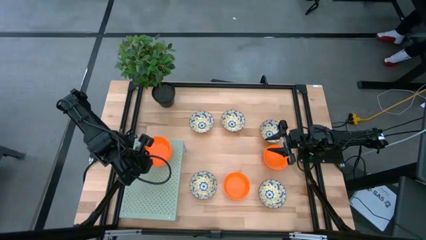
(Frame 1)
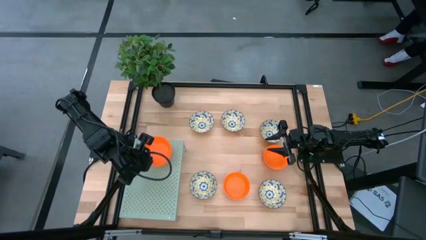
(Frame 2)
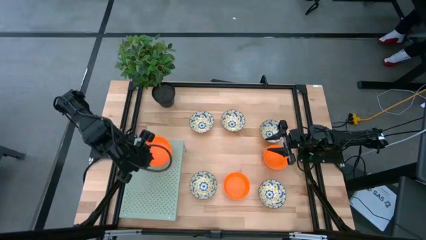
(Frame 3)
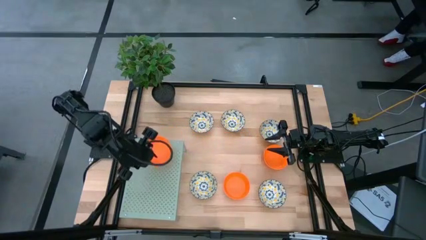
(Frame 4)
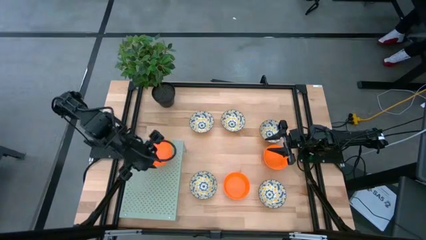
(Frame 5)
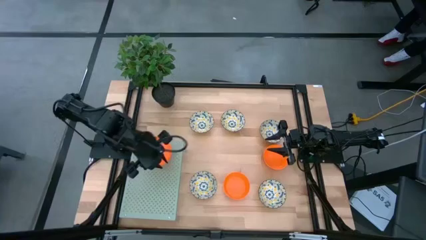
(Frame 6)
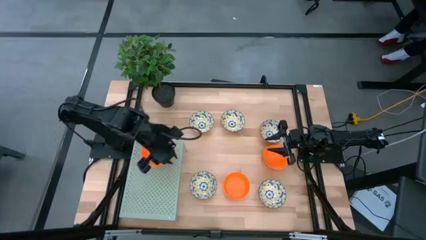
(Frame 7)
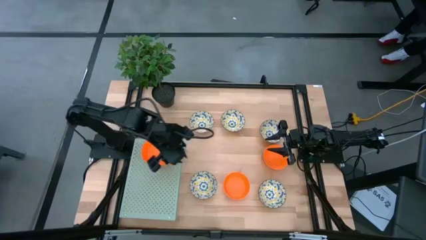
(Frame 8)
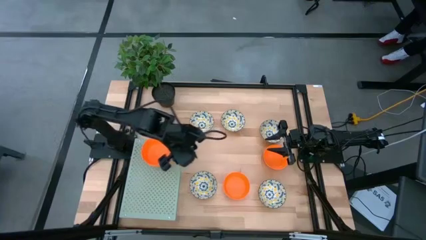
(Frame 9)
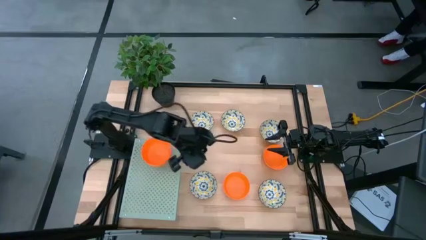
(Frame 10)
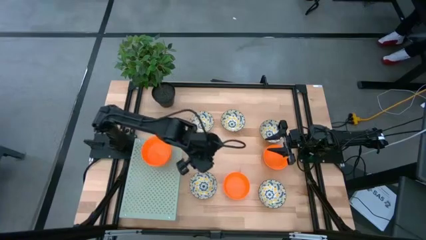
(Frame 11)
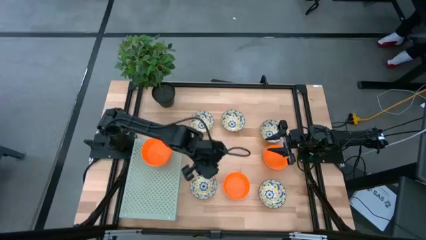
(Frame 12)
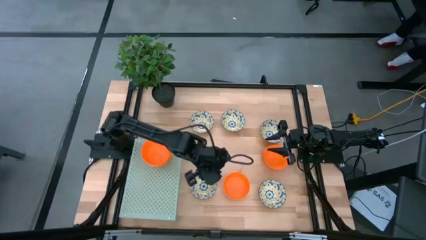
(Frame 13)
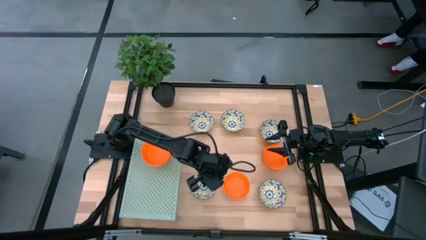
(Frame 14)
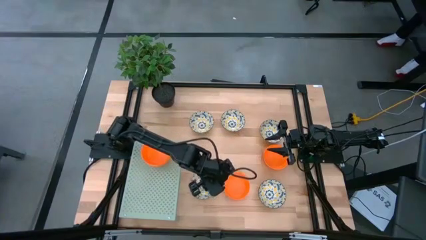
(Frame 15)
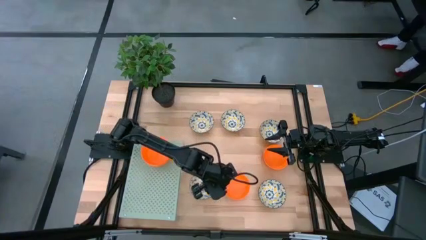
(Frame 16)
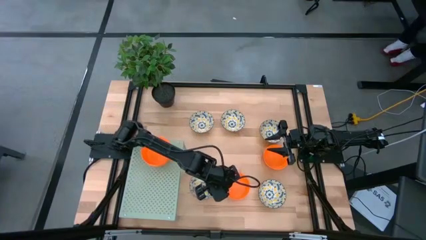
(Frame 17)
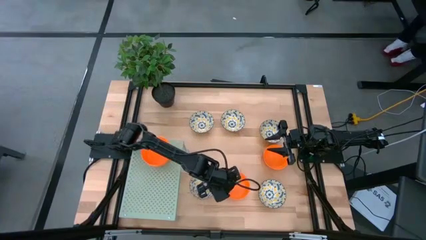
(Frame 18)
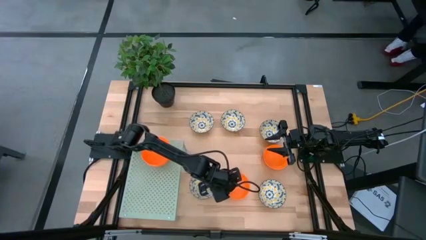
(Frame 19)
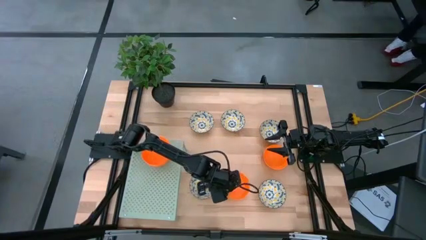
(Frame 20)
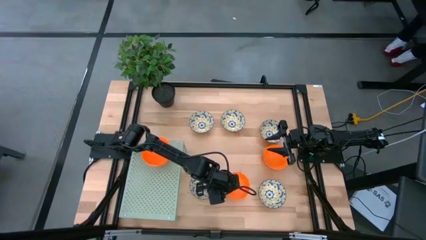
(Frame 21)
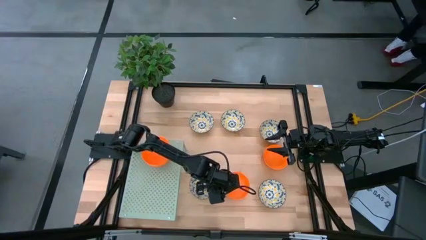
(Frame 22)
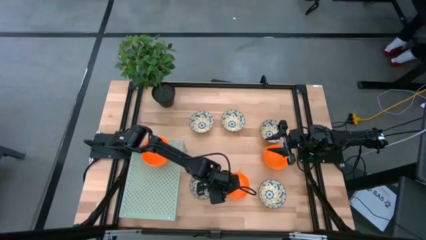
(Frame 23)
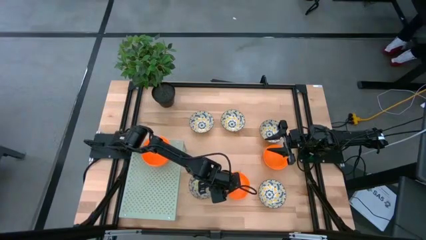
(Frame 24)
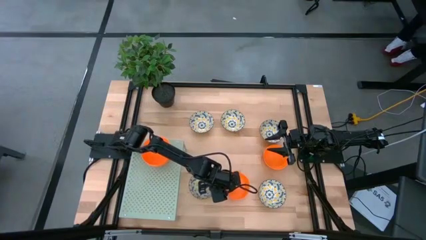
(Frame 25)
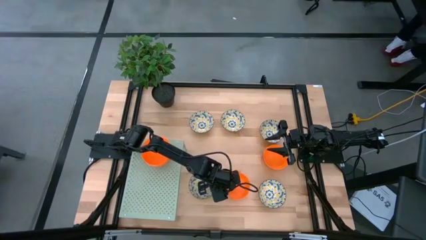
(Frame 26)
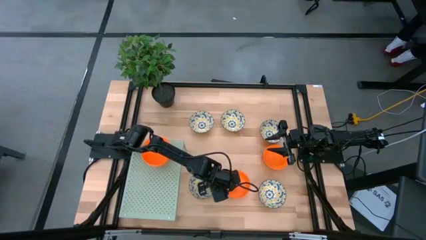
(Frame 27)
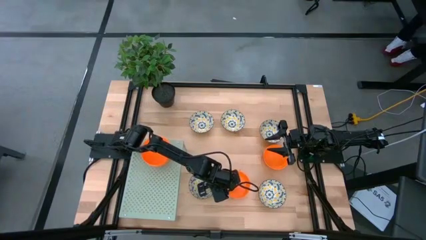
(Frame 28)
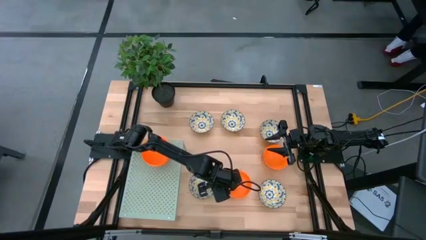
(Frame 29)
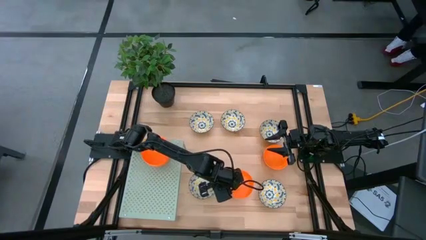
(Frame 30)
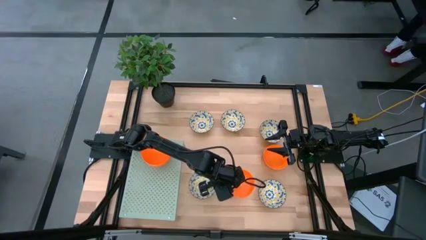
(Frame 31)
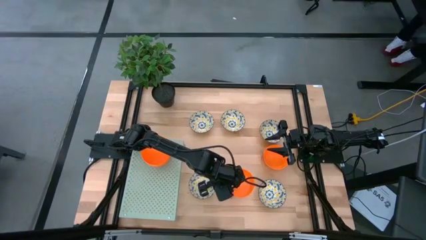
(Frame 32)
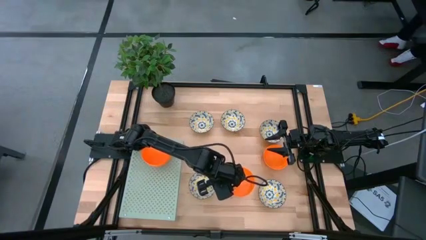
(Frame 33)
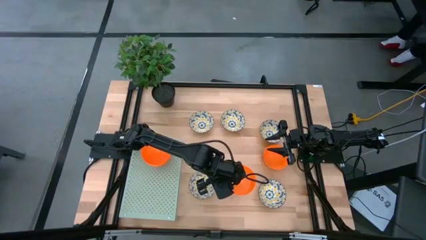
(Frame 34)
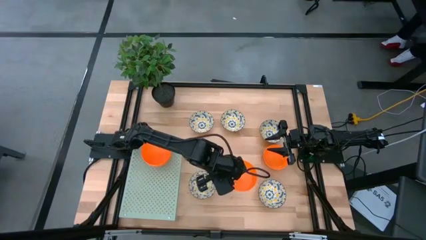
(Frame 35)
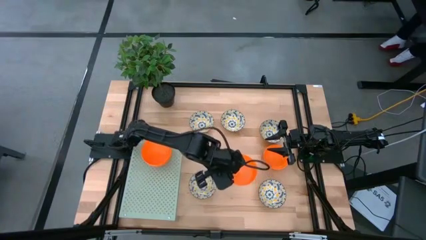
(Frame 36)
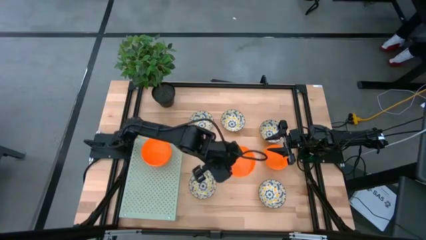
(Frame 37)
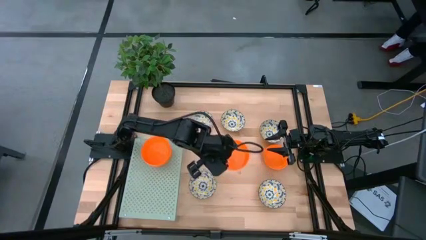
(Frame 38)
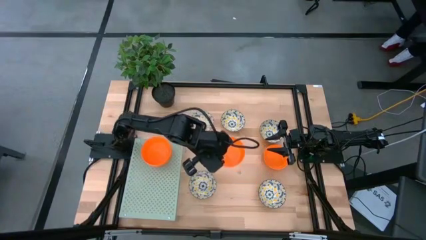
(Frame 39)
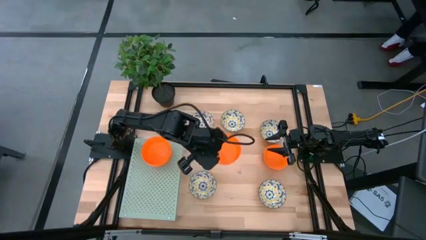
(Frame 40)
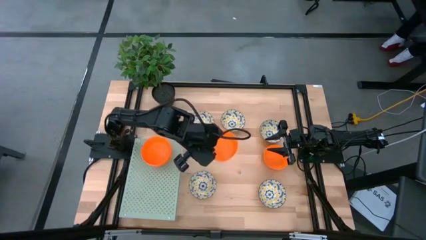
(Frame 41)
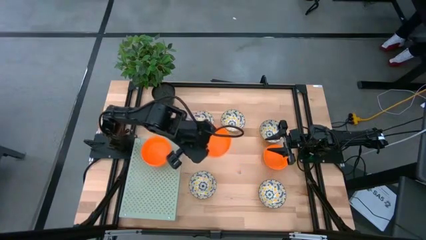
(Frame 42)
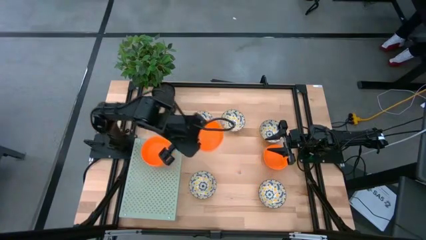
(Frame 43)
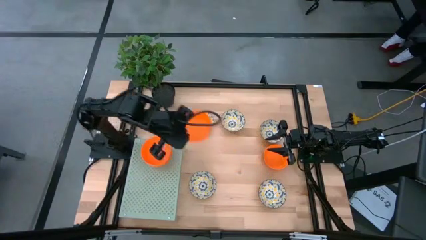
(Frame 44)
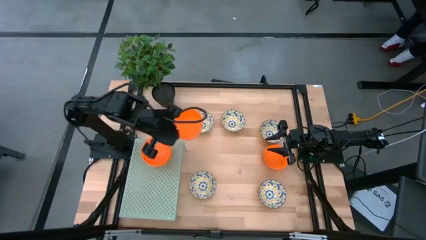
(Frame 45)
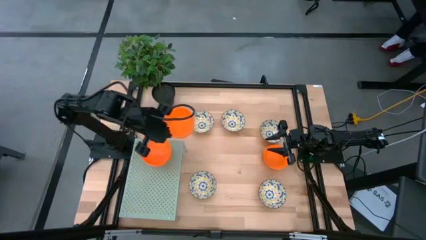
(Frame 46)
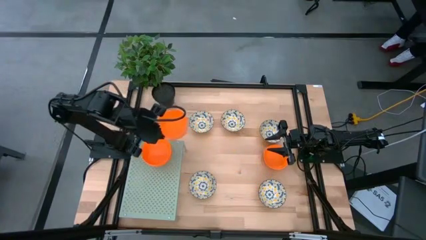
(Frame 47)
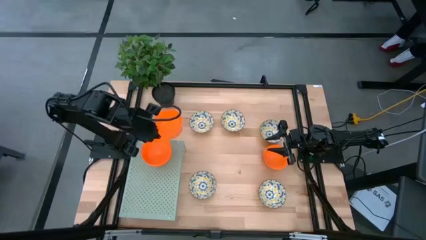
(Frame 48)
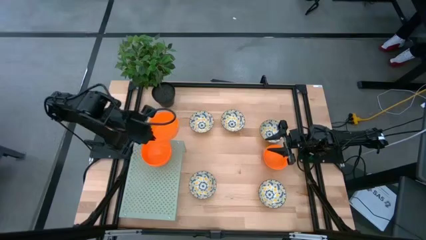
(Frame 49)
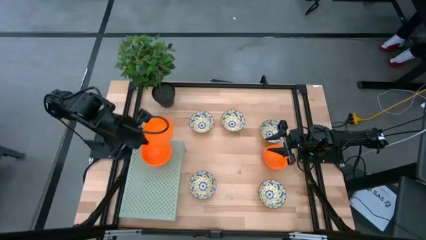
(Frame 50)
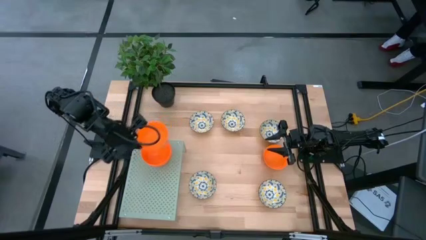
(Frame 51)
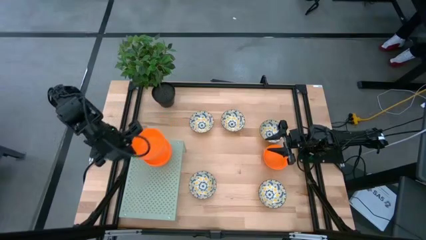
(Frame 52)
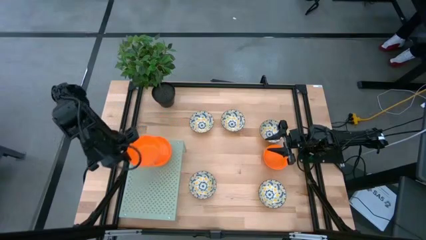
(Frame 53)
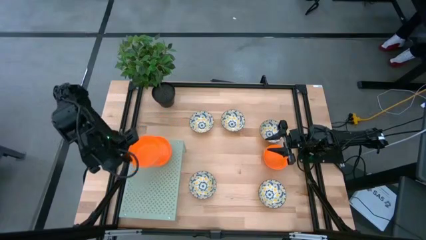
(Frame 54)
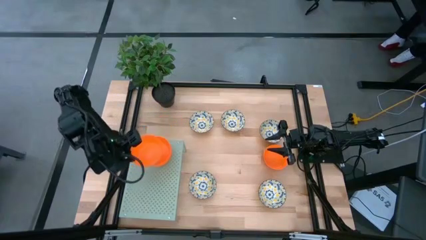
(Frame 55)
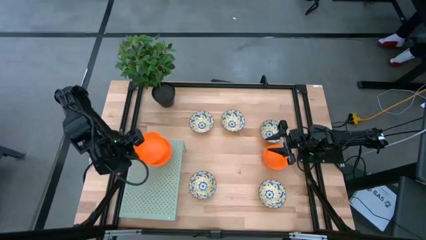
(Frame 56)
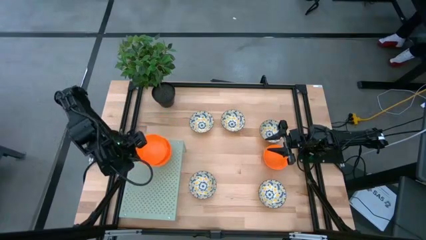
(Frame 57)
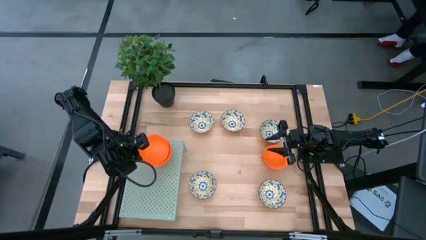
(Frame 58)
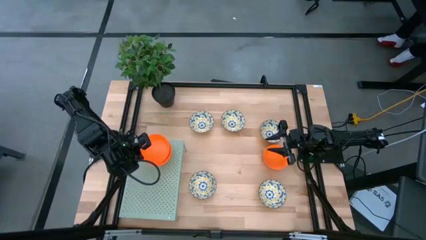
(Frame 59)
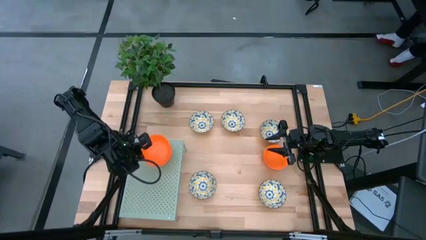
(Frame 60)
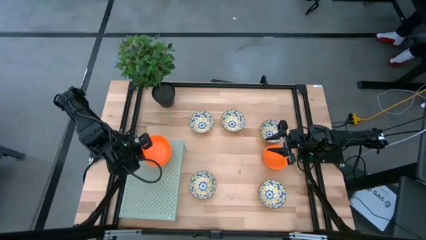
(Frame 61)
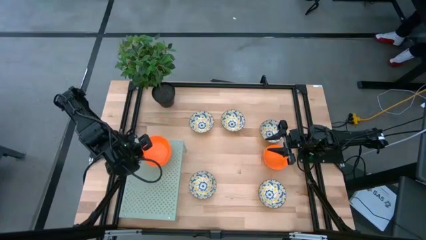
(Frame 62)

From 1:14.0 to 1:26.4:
Task: Pick & Place Mini bowls
Stack the orange bowl on top of the orange bowl on the shelf

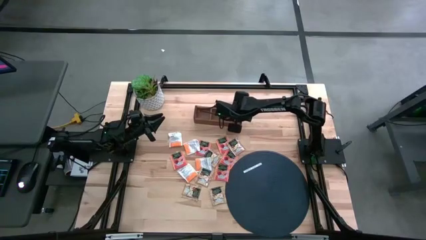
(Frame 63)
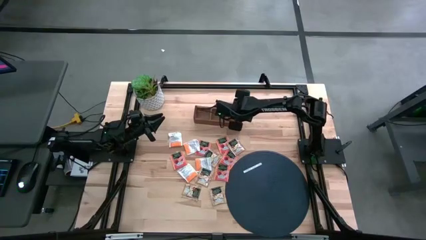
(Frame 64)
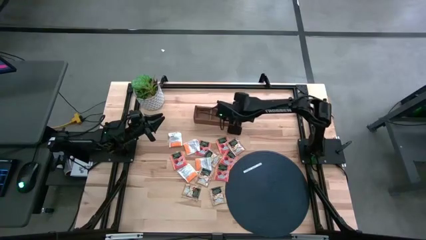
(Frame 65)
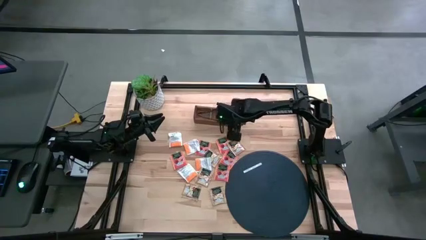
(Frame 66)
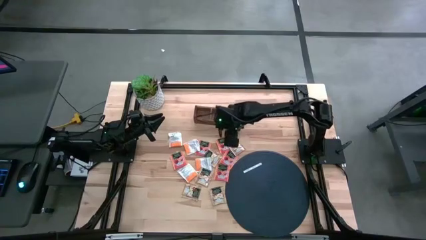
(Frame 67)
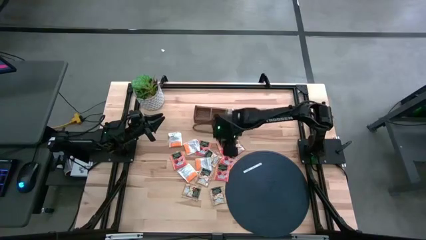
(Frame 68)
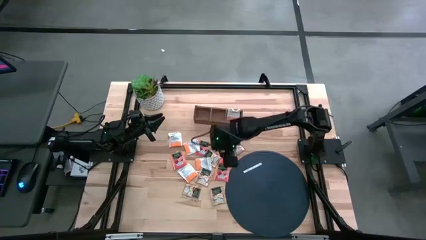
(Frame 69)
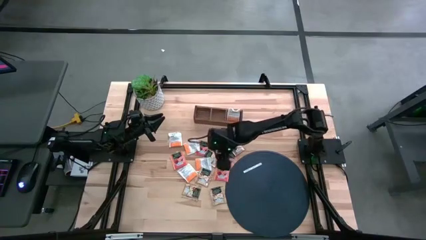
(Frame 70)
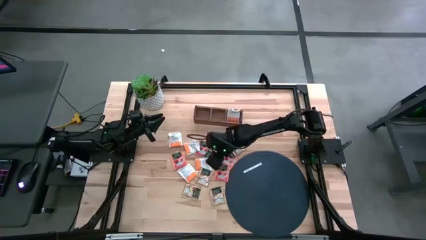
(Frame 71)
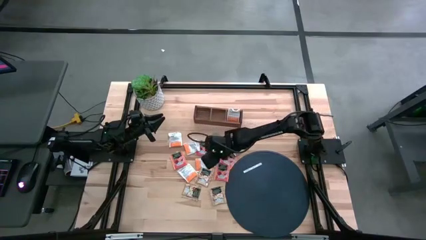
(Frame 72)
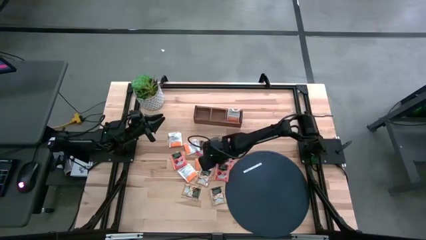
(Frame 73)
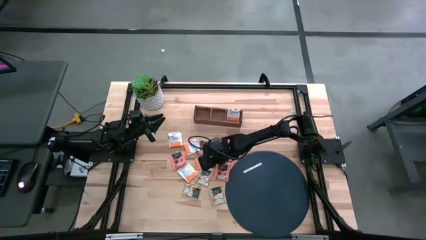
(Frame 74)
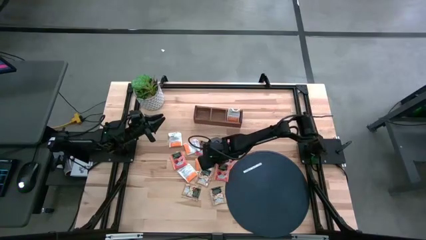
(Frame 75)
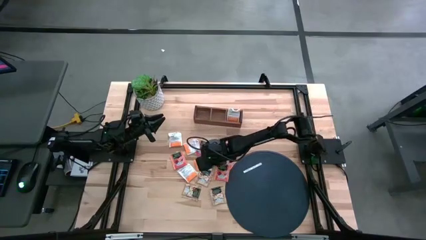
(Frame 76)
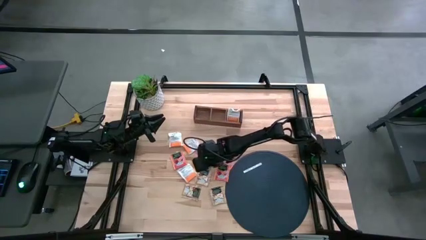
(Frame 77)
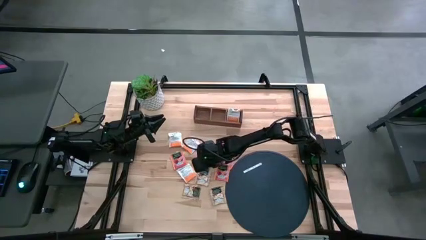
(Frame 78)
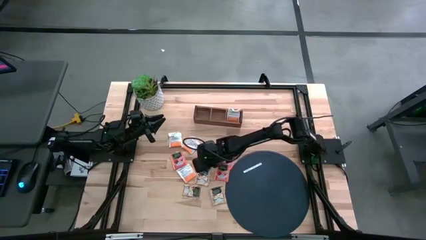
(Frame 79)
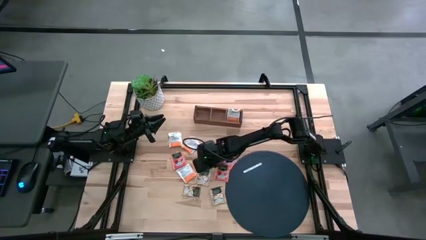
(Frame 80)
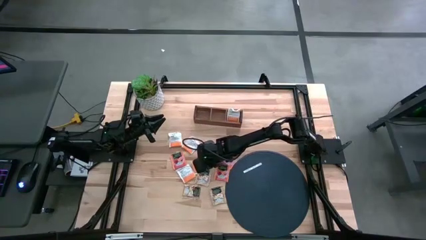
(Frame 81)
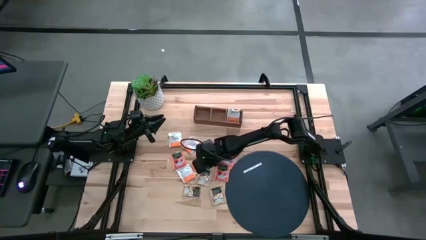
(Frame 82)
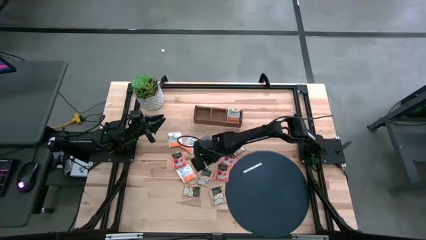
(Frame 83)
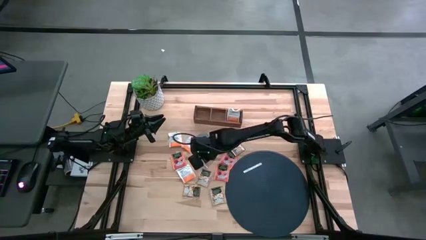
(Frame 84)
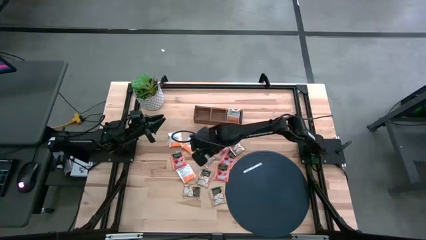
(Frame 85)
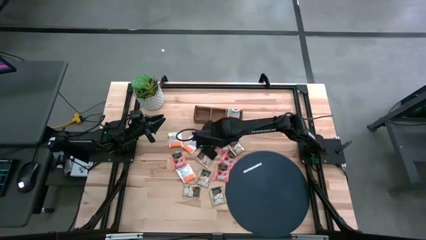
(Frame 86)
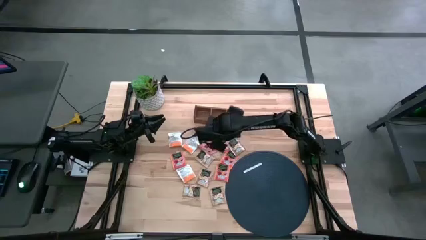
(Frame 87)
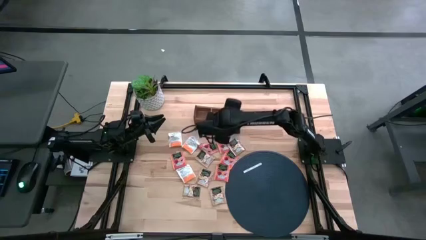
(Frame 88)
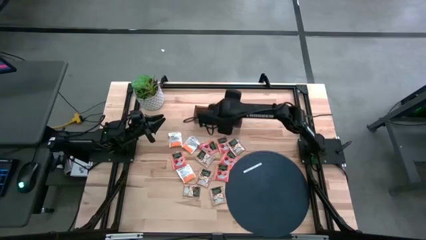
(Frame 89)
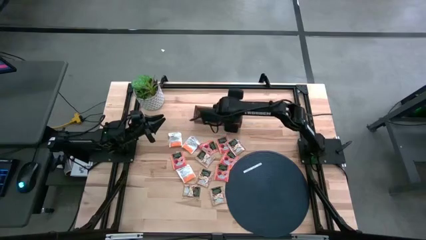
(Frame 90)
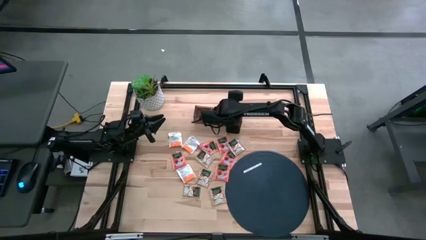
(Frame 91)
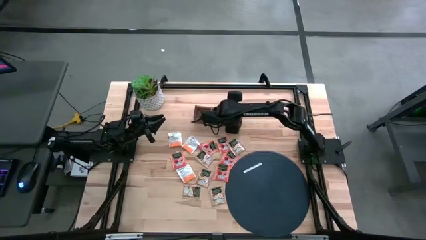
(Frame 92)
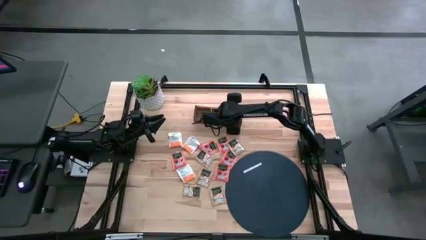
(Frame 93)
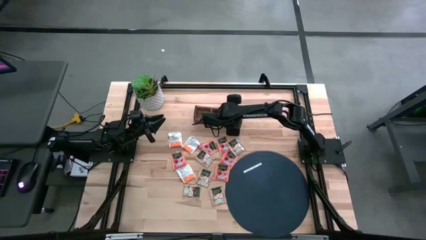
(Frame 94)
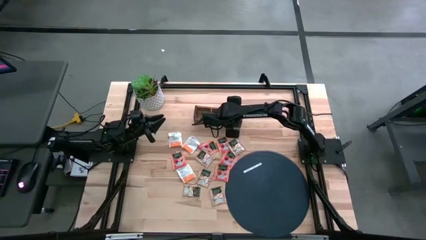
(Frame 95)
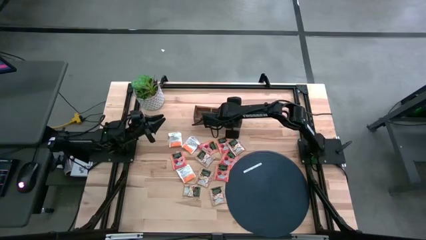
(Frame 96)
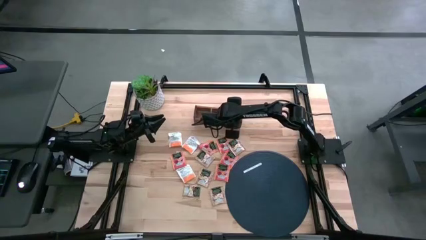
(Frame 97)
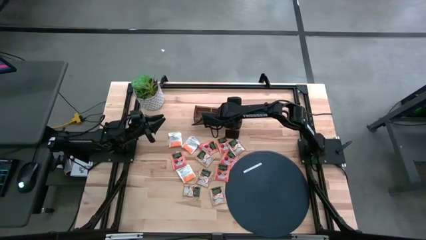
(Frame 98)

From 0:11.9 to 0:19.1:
Task: Pick & Place Tea
Put the white orange tea sachet into the right section of the wooden organizer
